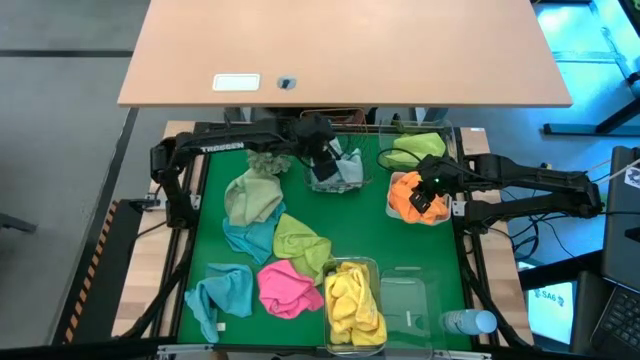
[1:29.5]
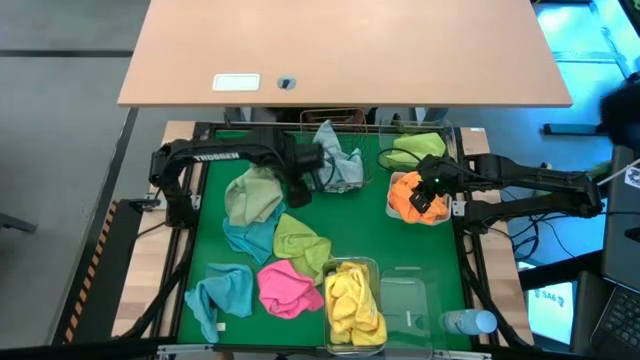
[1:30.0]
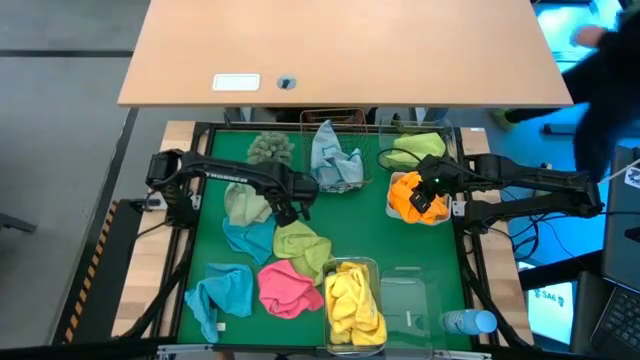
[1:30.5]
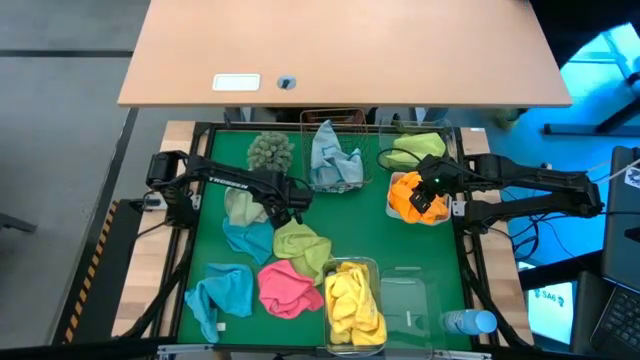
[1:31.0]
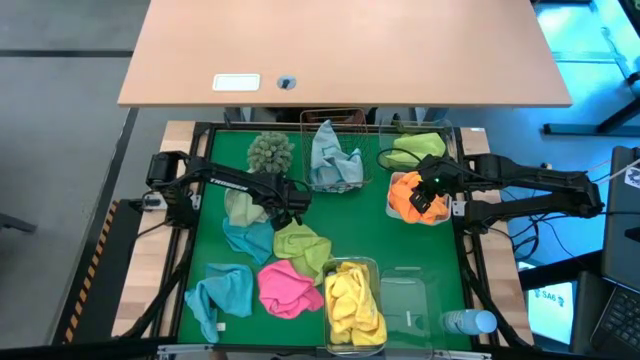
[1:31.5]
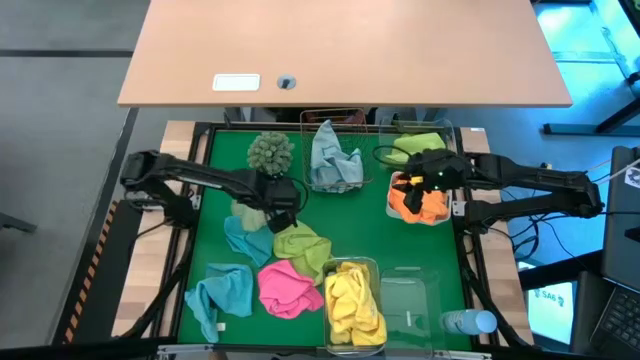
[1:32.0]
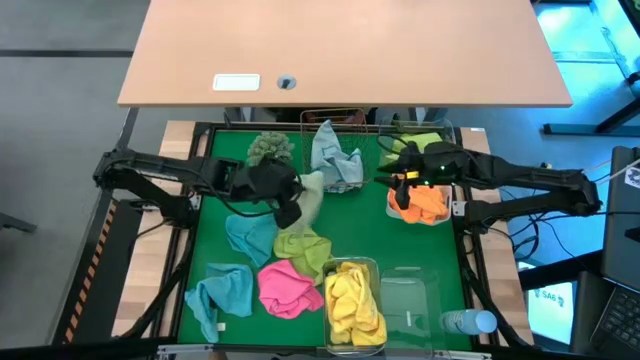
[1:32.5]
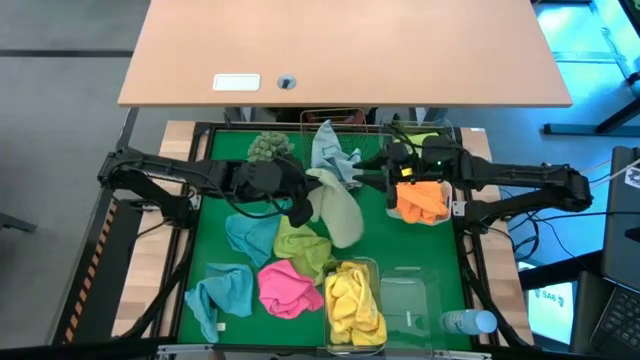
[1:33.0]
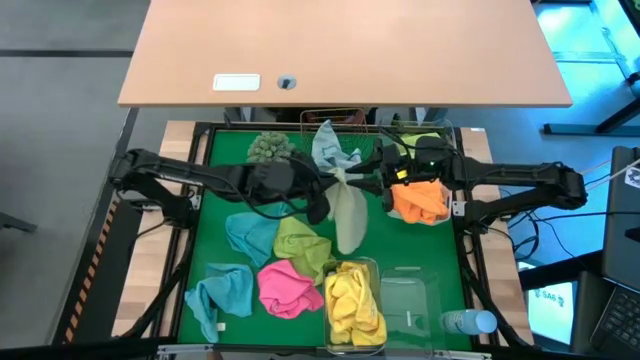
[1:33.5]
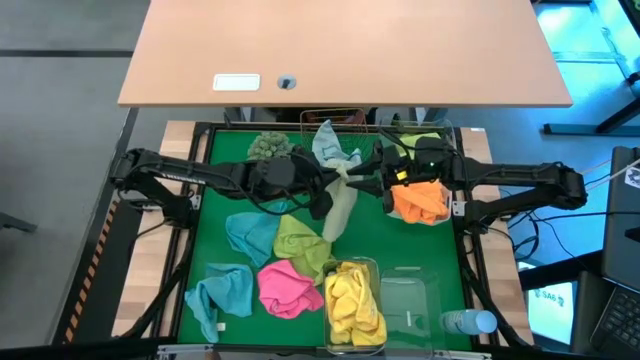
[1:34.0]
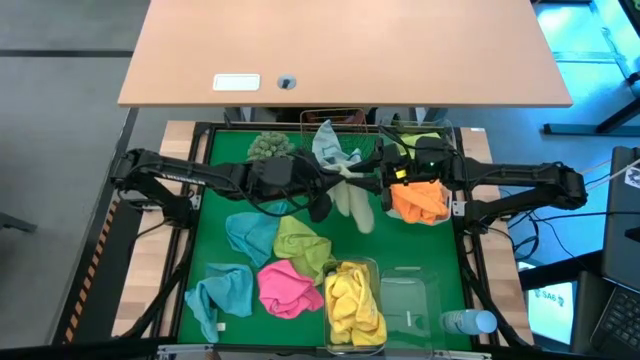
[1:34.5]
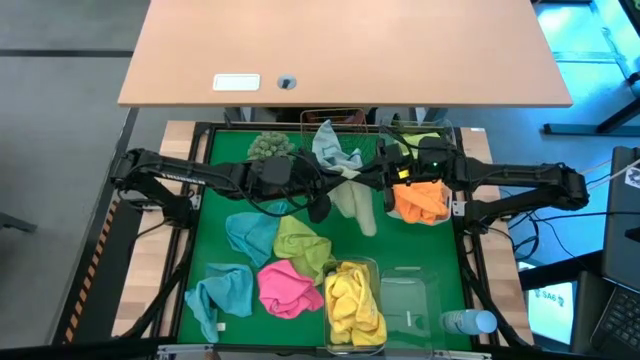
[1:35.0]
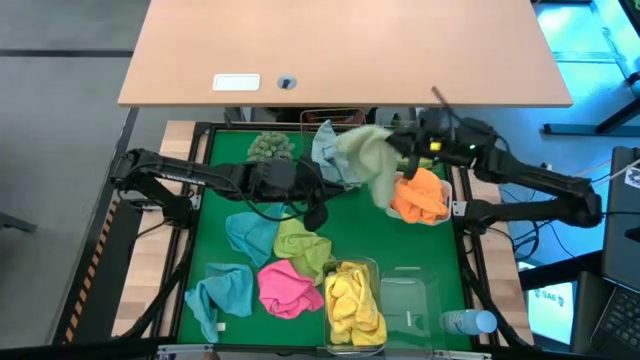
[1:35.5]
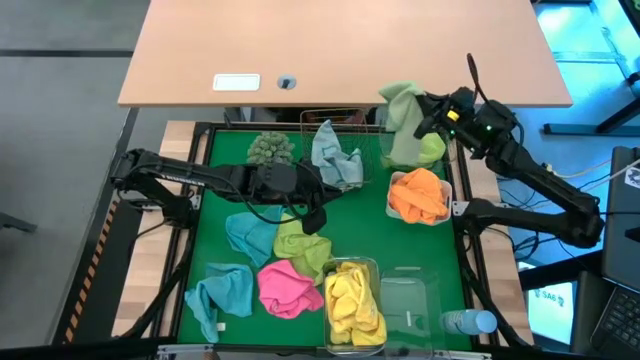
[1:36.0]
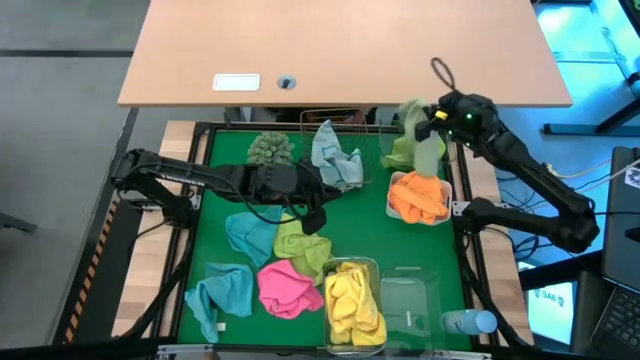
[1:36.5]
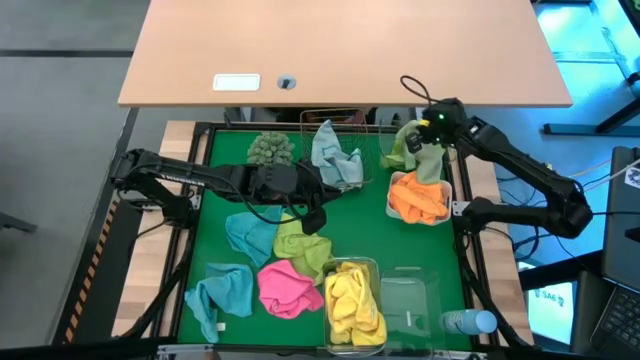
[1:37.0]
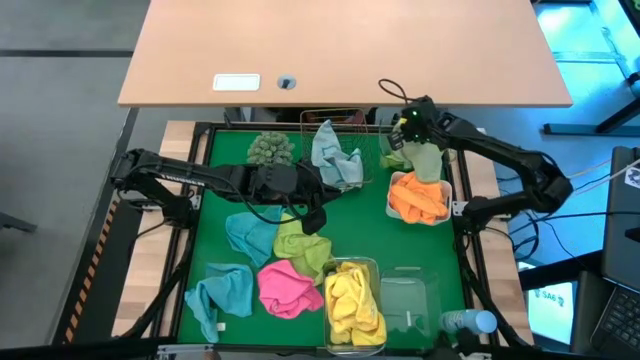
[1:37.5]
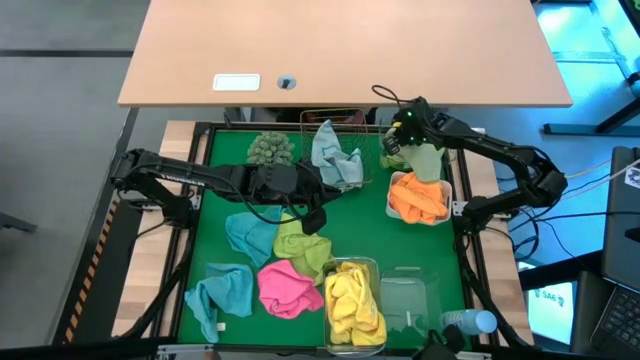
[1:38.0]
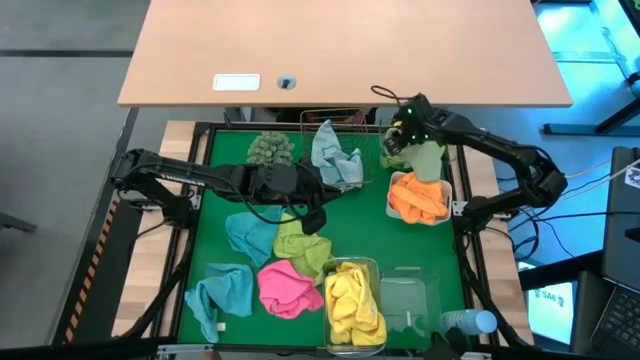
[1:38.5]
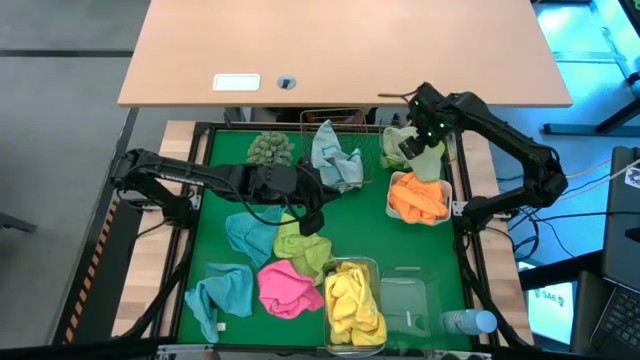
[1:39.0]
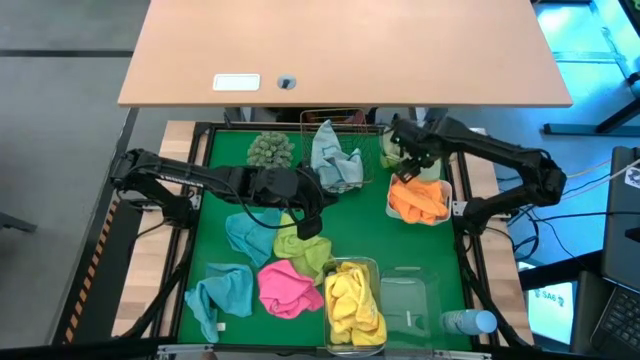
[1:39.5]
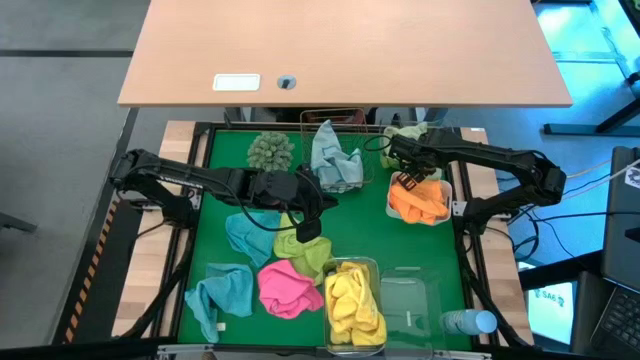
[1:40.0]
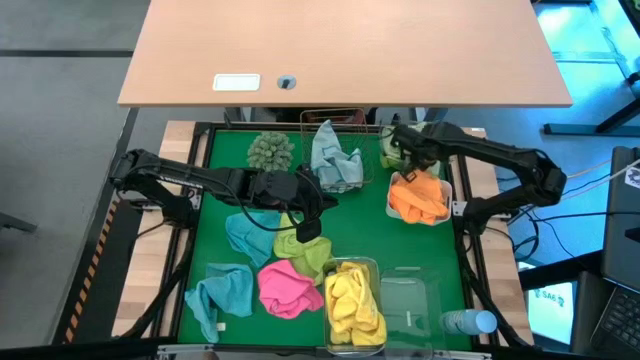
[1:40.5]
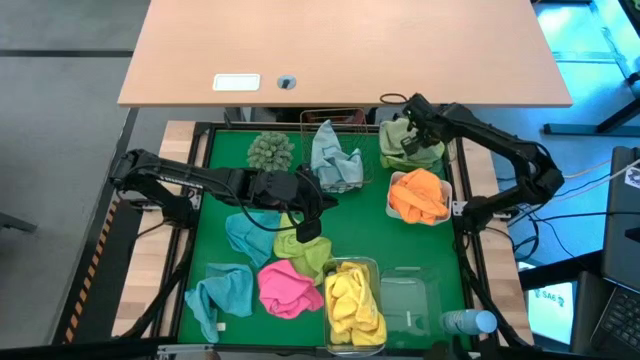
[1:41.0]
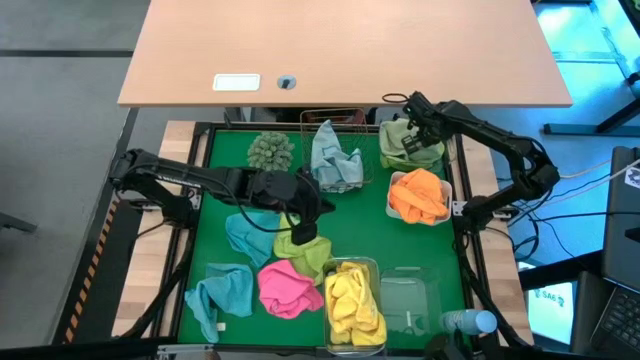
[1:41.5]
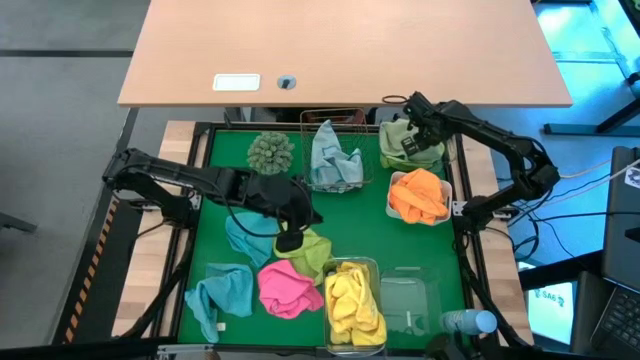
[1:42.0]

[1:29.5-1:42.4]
Task: Sort microfiber towel by color & place in baskets
Put the green microfiber towel into the top transparent bin

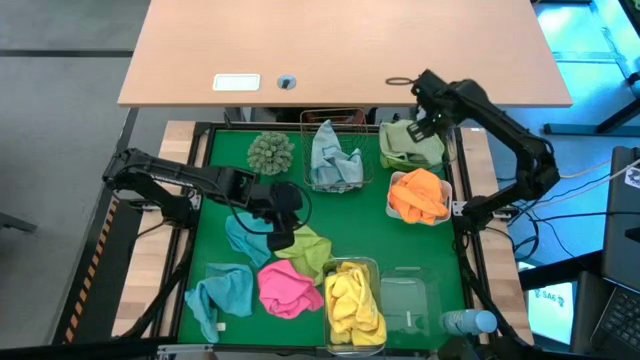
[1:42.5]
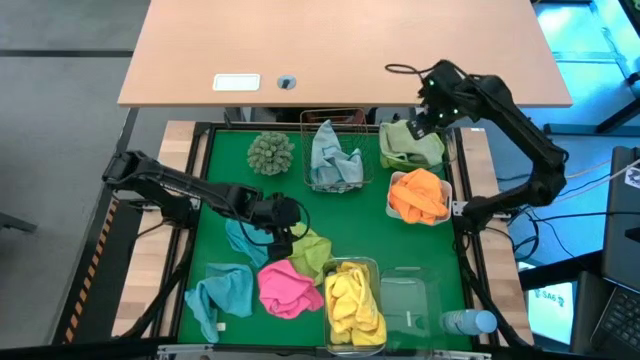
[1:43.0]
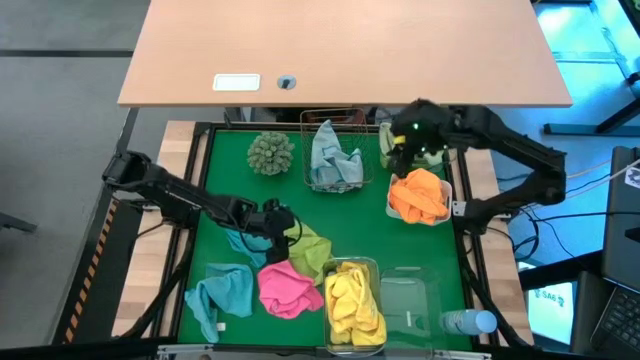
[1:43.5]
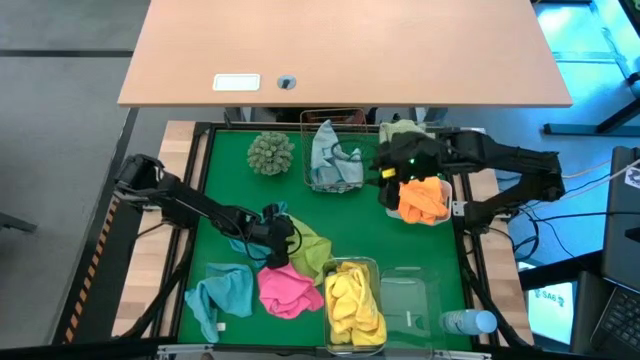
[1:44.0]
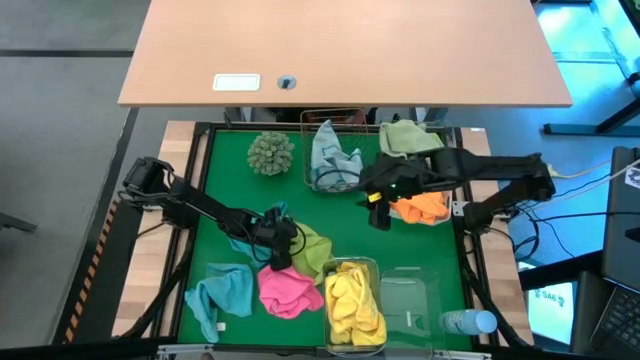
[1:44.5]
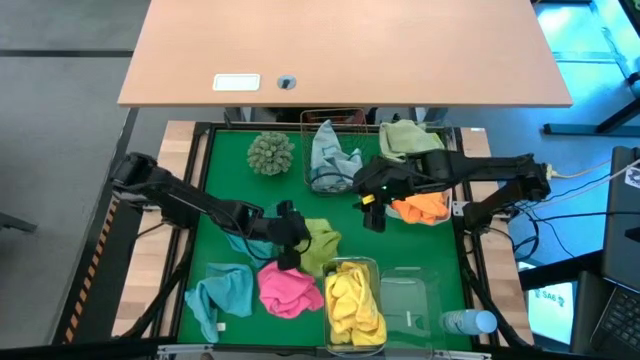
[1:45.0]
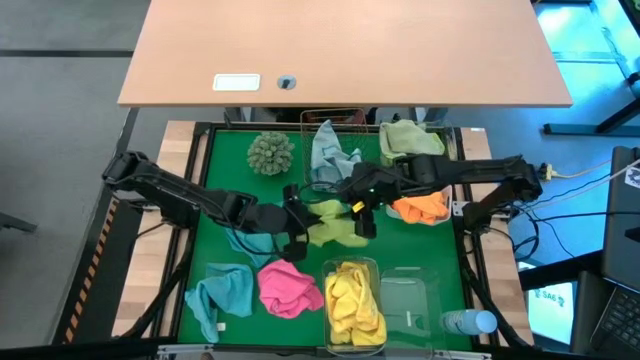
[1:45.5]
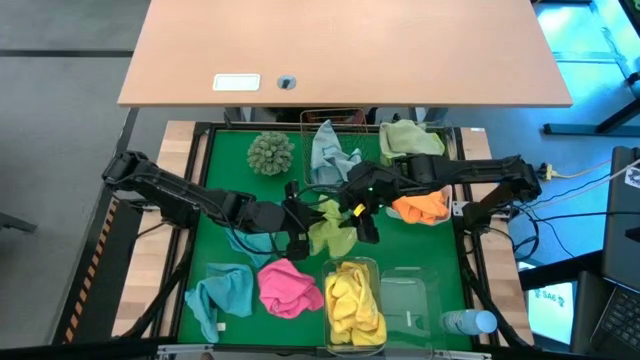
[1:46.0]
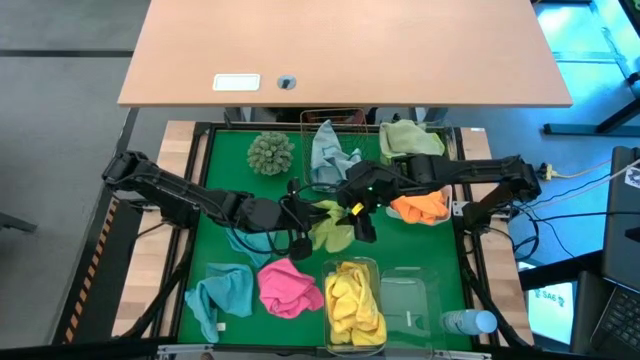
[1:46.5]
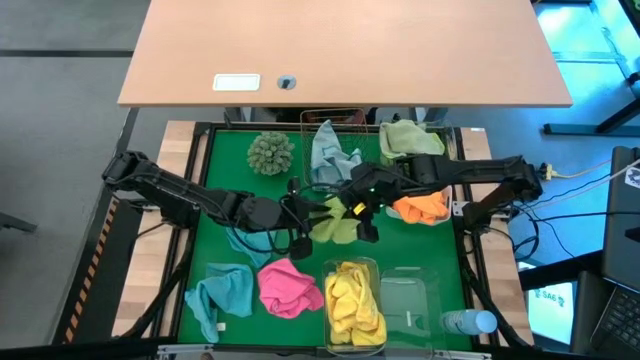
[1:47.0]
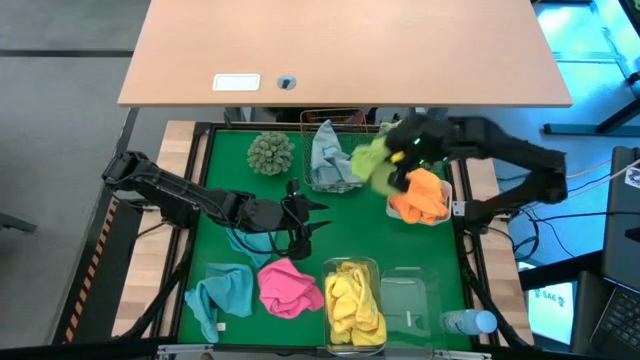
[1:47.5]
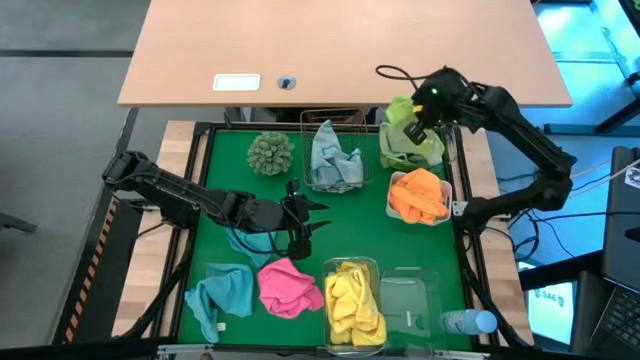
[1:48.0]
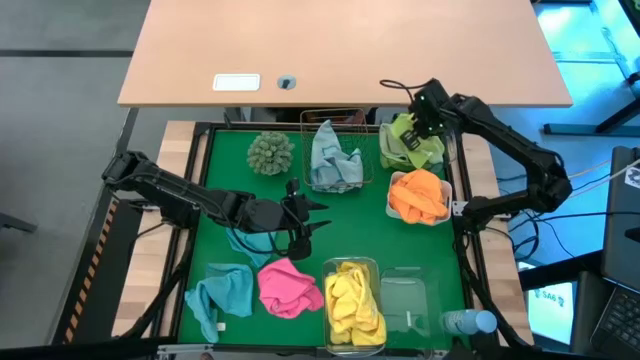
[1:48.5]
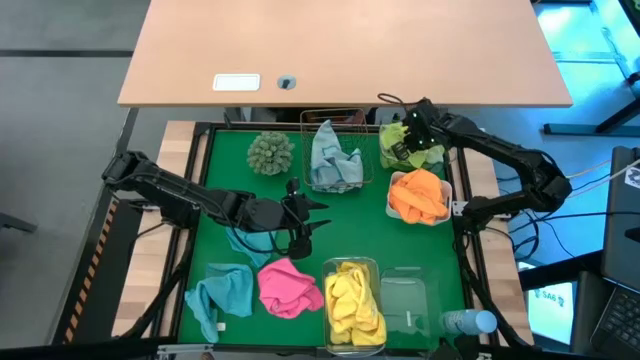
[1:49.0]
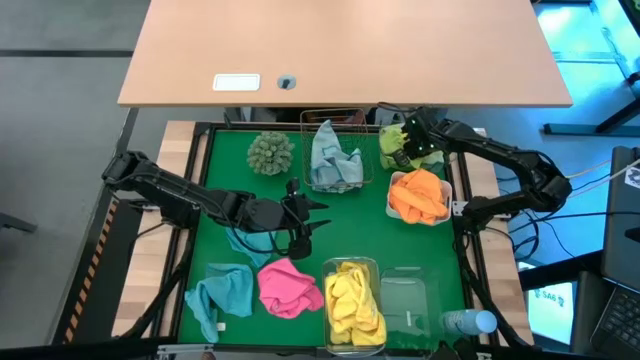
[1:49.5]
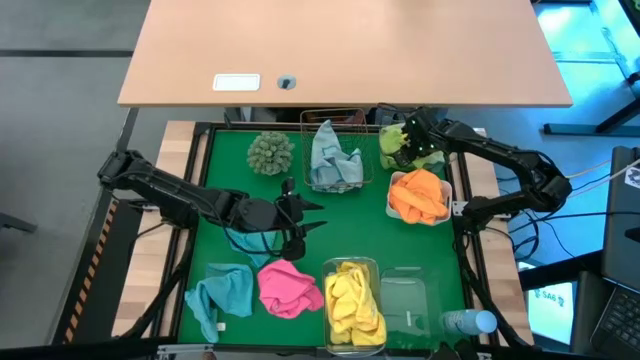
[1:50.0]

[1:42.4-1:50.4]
Put the green microfiber towel into the top transparent bin
